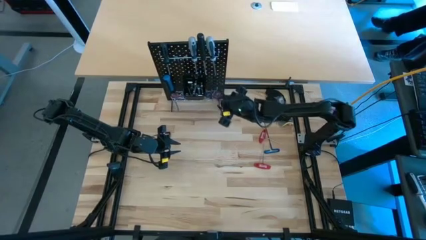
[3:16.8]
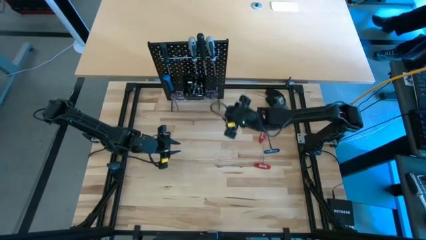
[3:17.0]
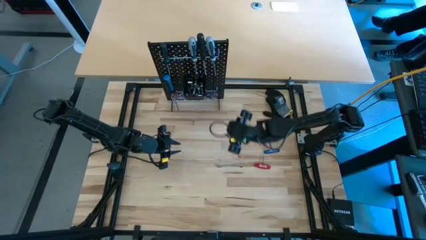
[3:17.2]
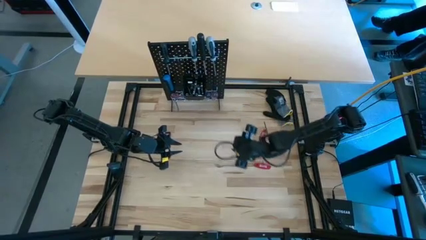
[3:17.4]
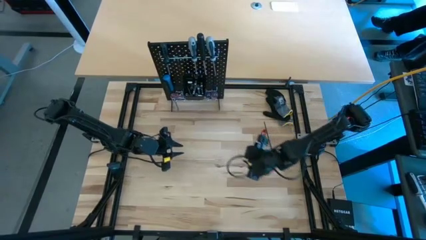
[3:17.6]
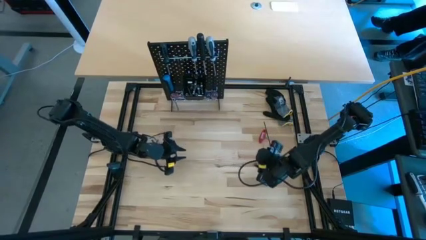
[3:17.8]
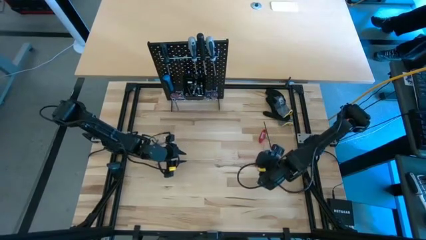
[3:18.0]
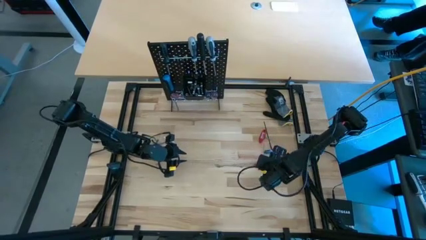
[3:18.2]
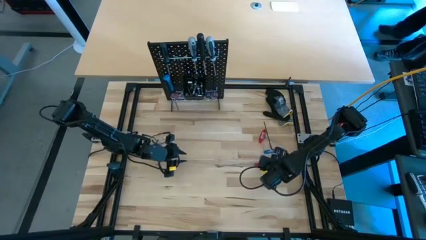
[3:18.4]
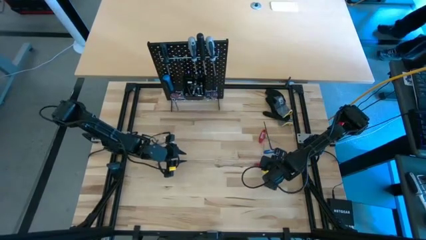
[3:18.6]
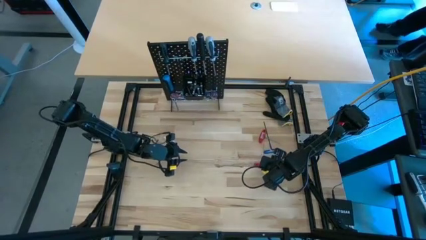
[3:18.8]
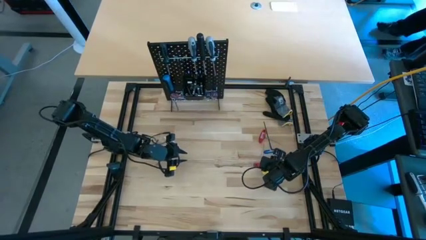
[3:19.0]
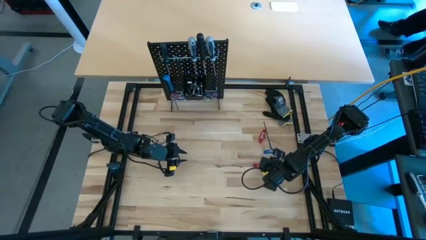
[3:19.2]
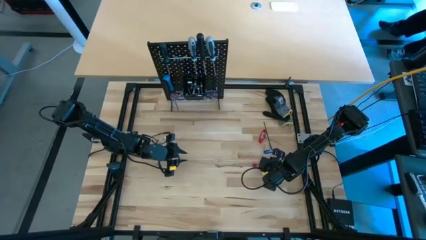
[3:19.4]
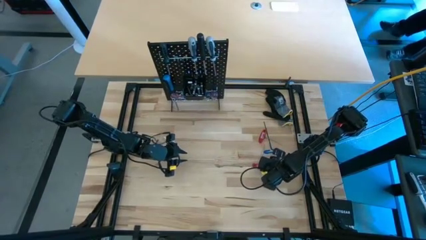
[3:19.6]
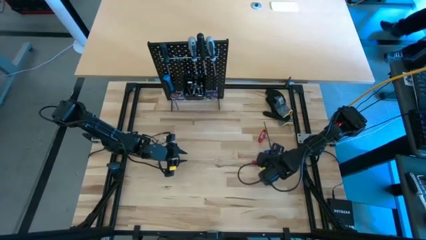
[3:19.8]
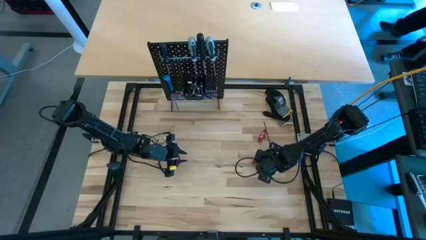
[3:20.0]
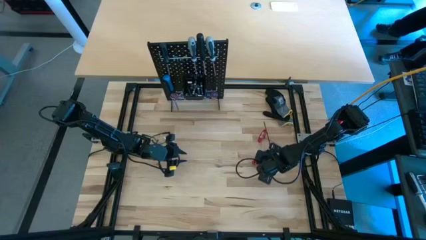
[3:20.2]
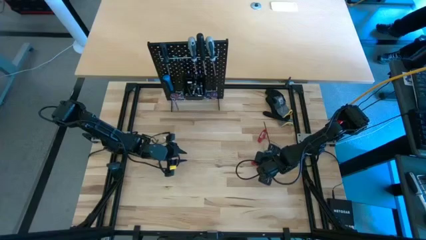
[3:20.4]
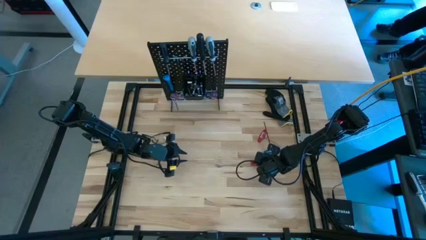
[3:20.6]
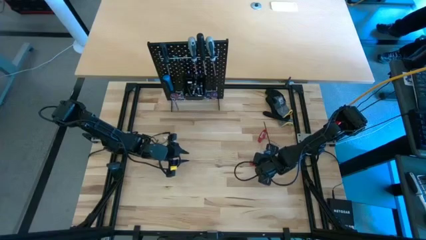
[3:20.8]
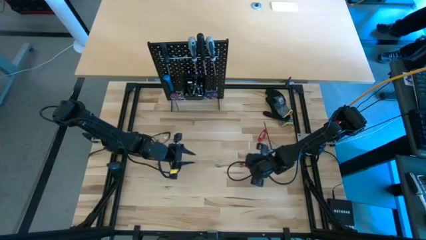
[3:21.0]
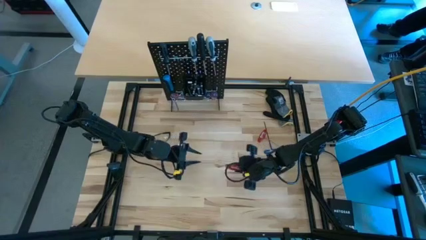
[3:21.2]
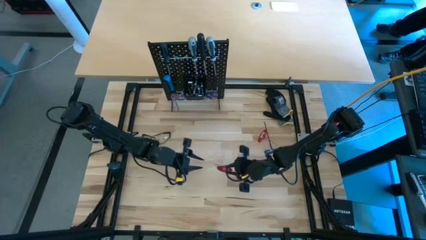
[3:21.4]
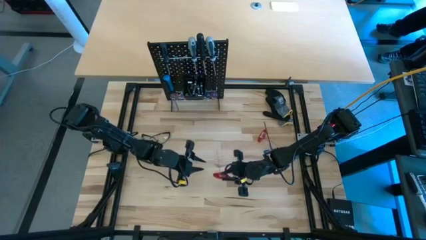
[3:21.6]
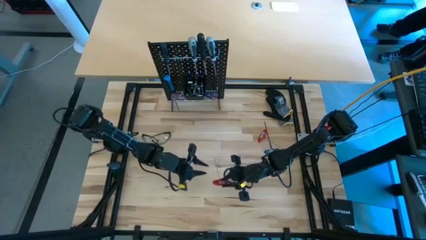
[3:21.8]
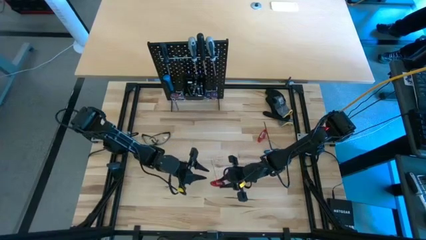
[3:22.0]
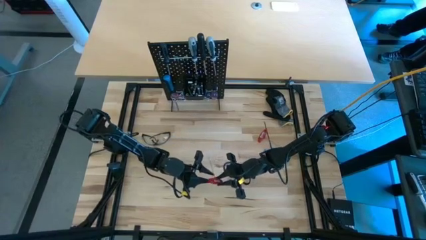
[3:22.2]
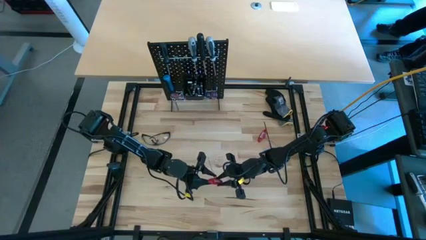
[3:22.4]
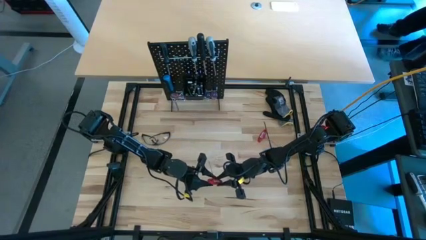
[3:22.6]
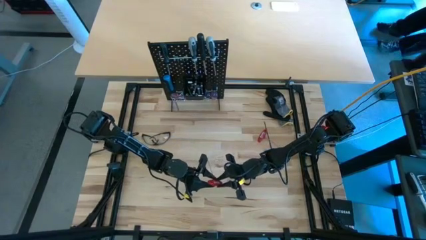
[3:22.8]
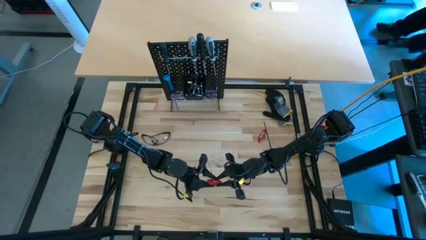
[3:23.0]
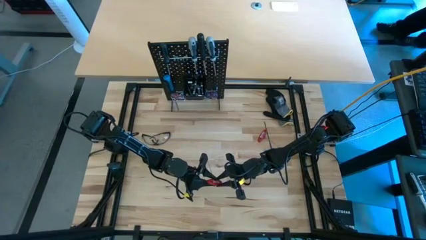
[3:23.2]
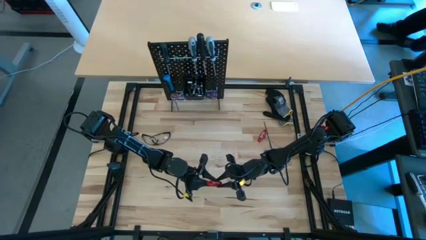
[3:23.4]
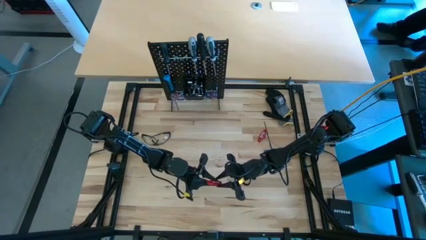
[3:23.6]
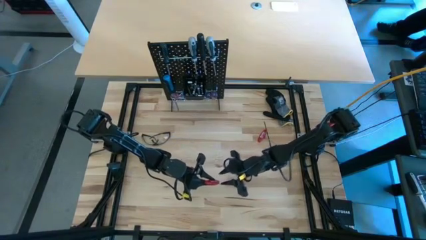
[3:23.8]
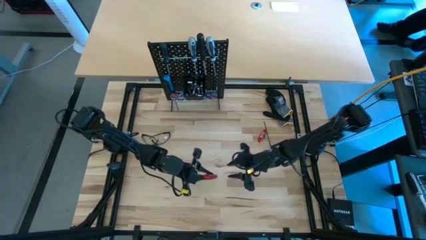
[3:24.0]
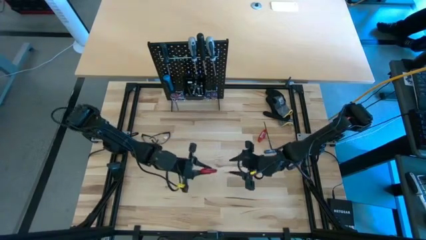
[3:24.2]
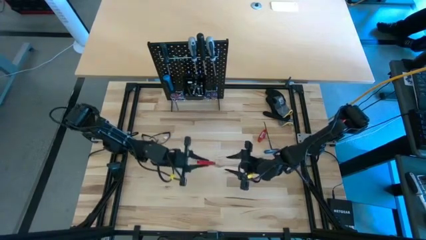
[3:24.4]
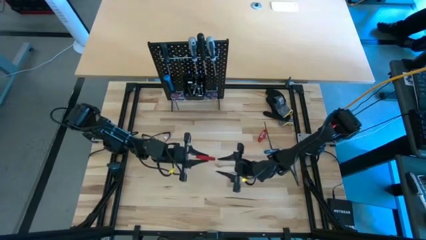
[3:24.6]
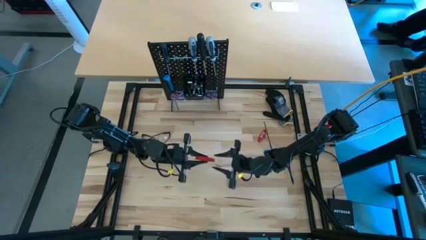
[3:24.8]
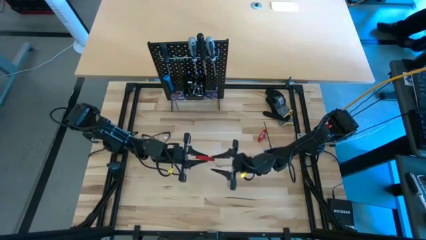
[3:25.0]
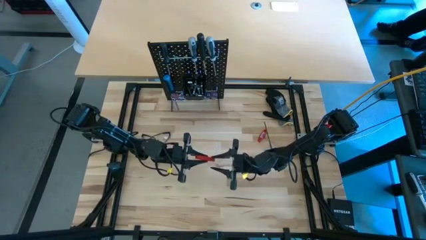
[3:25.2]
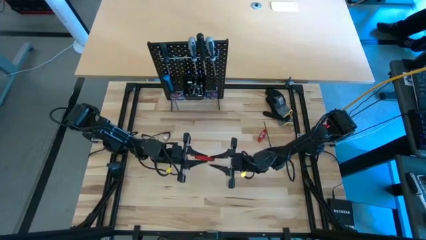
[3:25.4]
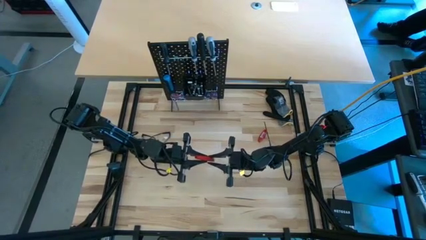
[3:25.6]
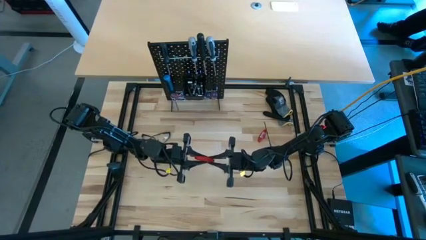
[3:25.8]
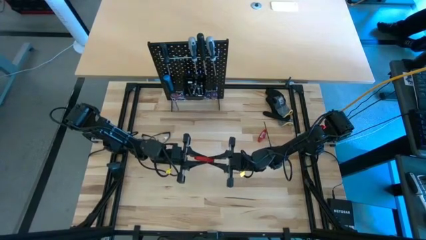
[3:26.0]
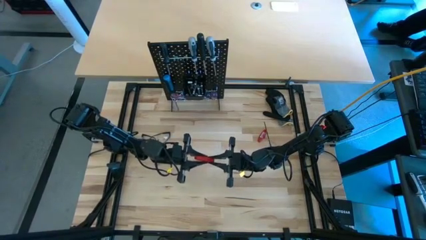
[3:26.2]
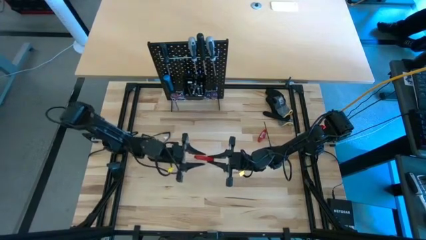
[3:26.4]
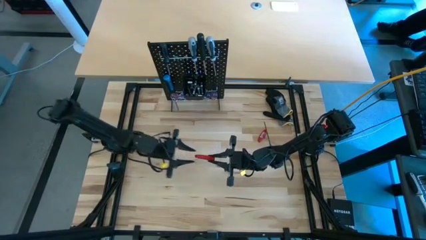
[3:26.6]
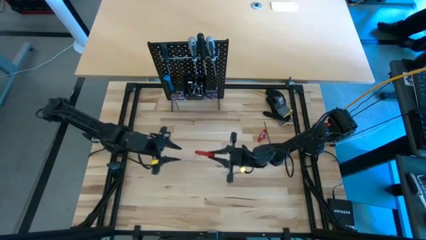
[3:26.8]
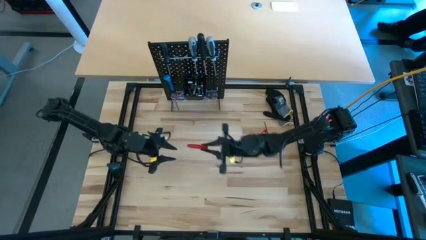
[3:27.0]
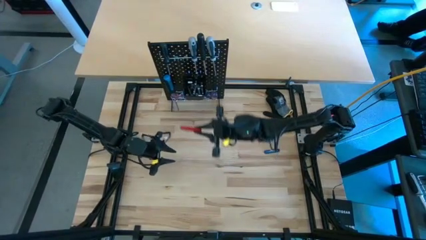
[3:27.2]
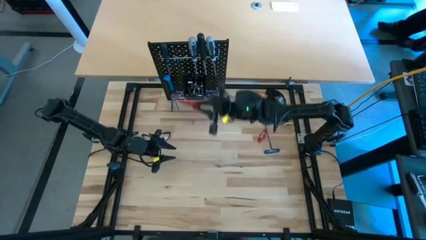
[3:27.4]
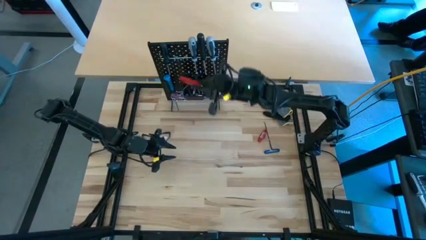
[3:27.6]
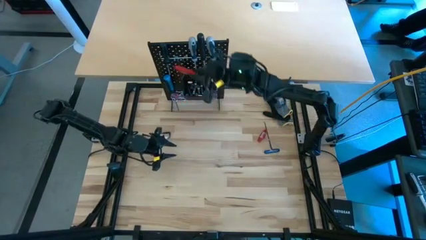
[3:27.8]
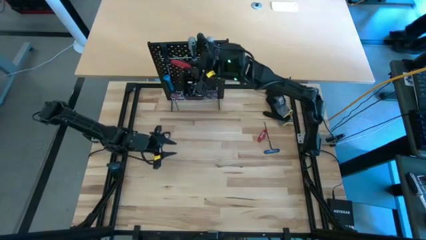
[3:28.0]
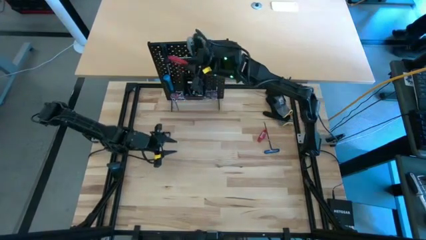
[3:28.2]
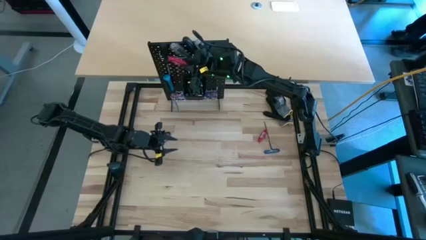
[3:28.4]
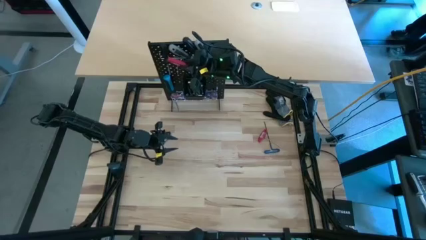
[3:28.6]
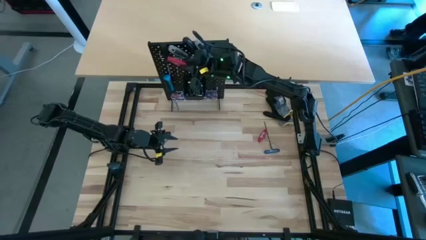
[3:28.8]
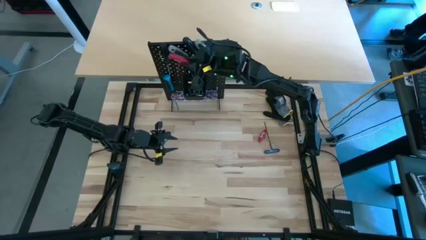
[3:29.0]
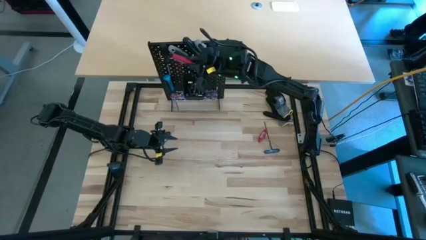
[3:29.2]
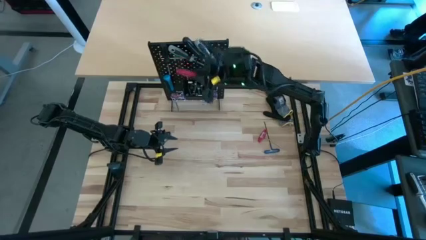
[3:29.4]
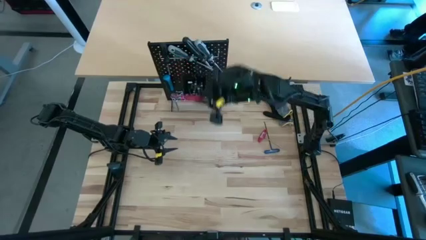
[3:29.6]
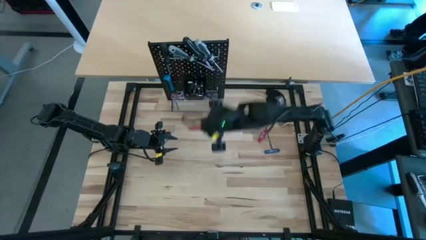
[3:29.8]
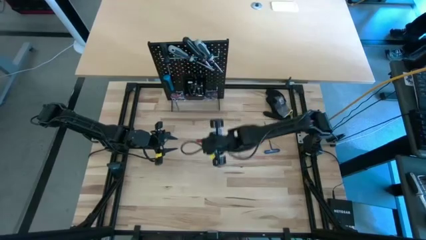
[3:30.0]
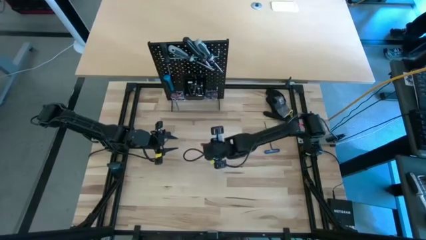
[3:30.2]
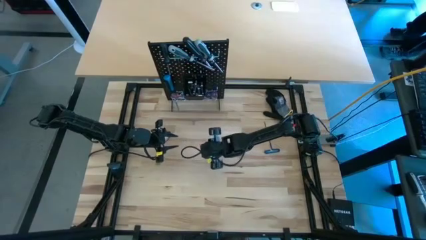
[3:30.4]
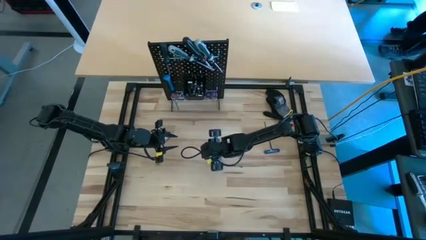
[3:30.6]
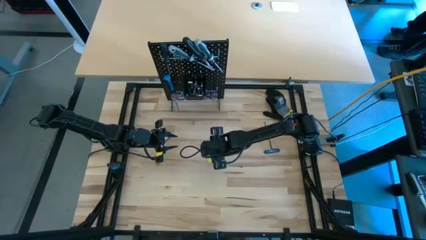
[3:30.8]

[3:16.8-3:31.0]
Task: Hang tools onto peg board
Hang the bottom red t-handle hex key on the peg board

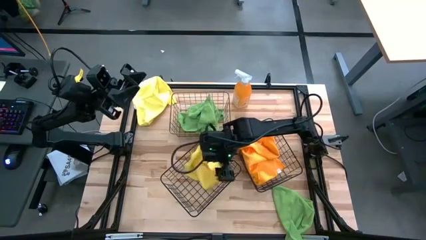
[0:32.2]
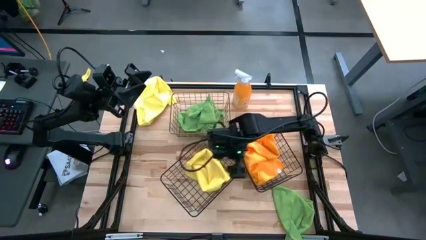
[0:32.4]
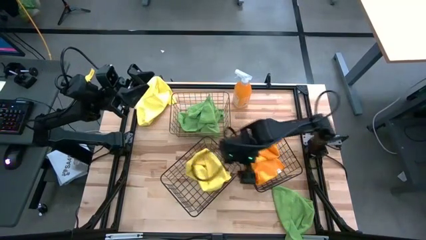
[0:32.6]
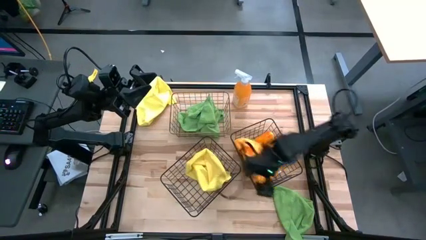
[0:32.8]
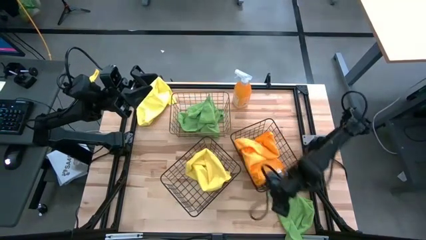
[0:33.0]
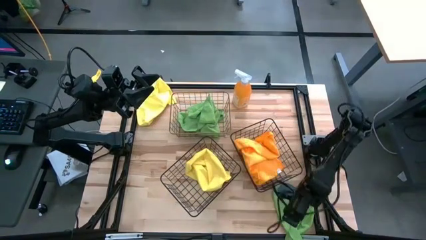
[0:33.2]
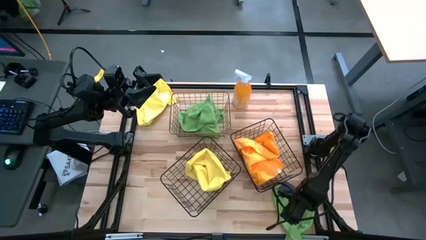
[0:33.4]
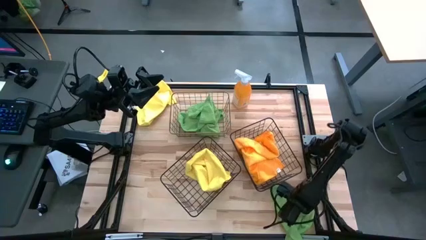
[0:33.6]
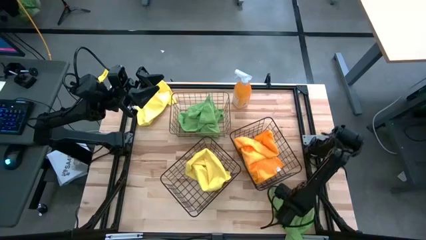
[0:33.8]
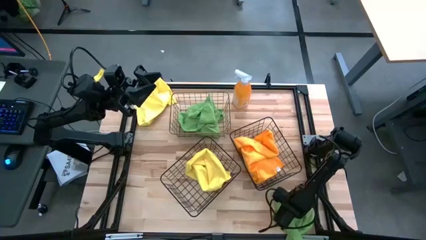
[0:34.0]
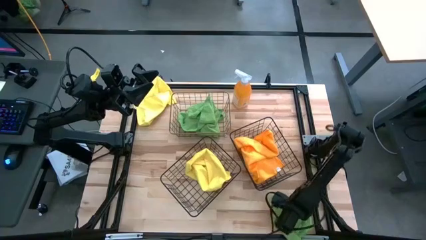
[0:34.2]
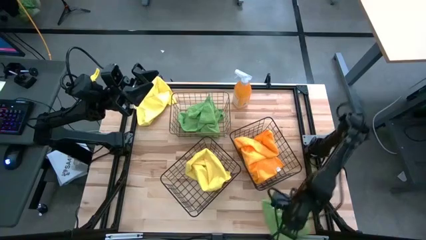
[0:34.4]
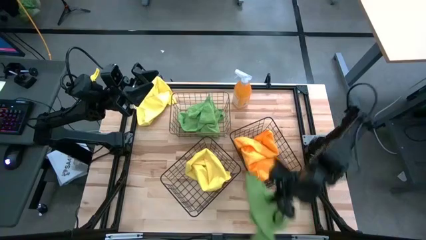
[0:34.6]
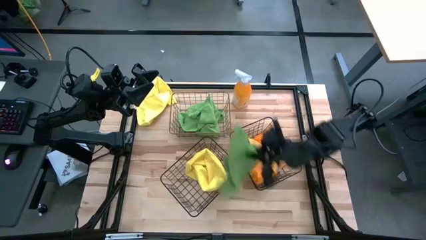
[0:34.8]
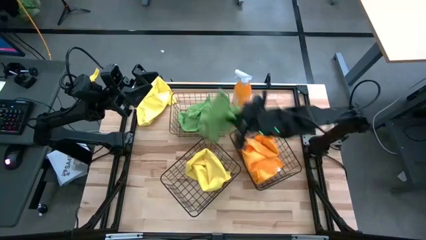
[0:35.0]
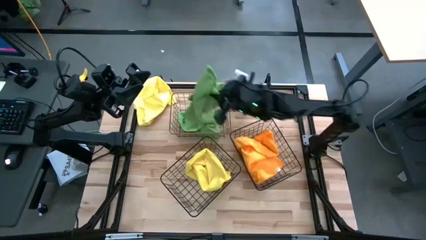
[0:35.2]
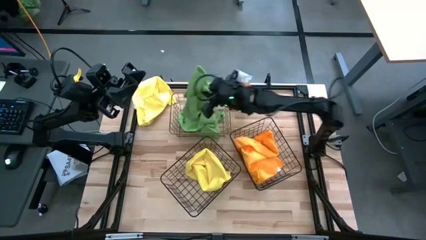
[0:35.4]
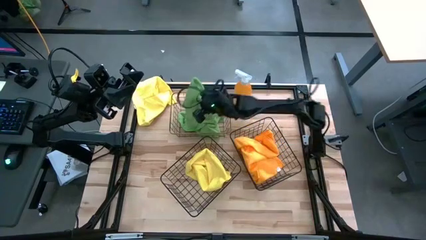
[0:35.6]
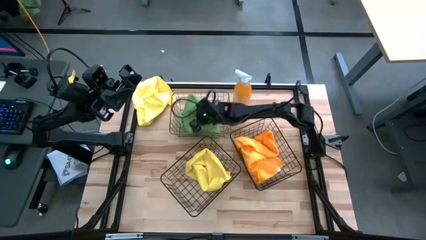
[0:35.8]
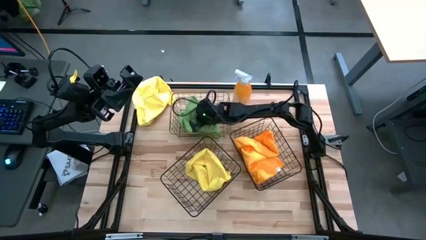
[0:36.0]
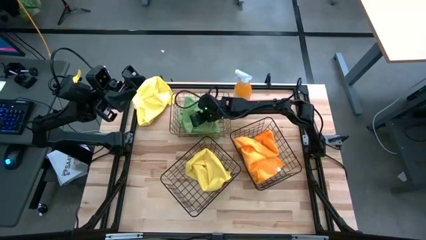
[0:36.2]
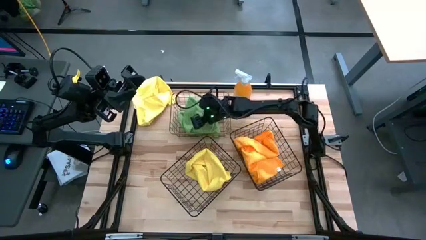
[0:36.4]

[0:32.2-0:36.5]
Task: Sort microfiber towel by color & place in baskets
Put the green microfiber cloth into the top wire basket
